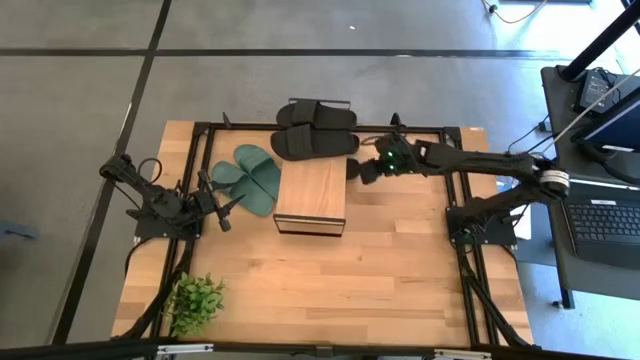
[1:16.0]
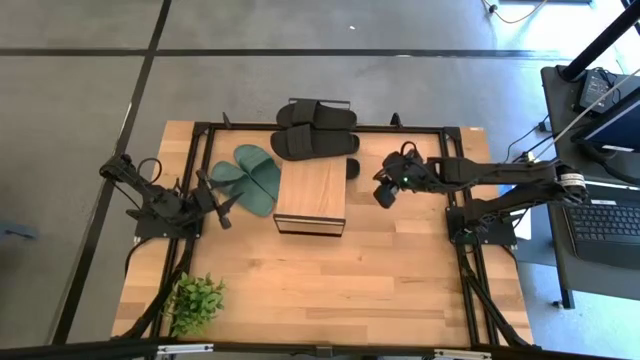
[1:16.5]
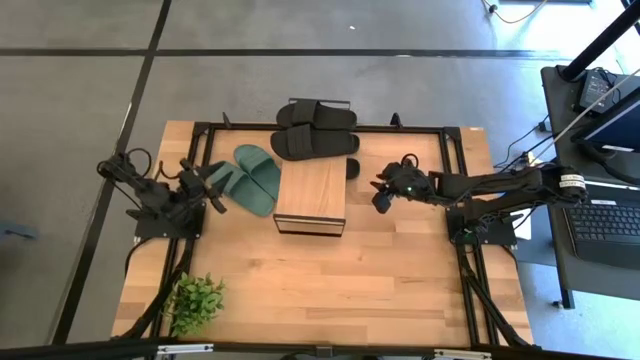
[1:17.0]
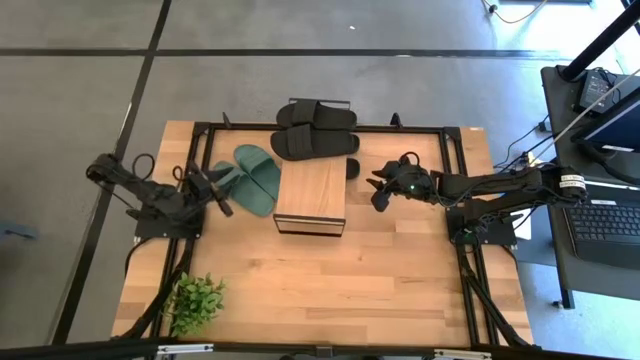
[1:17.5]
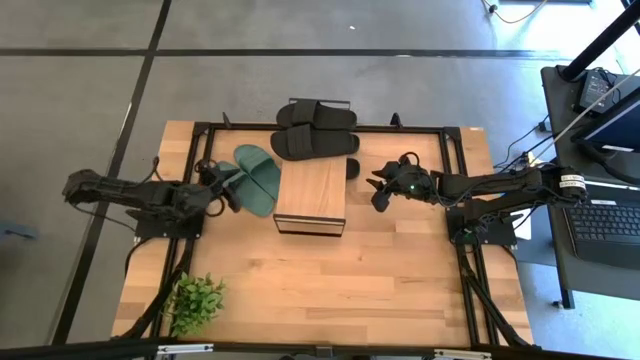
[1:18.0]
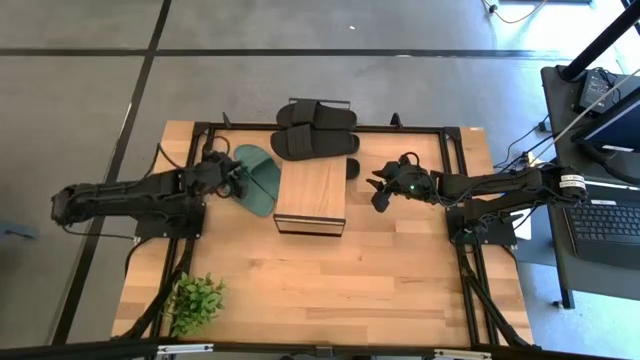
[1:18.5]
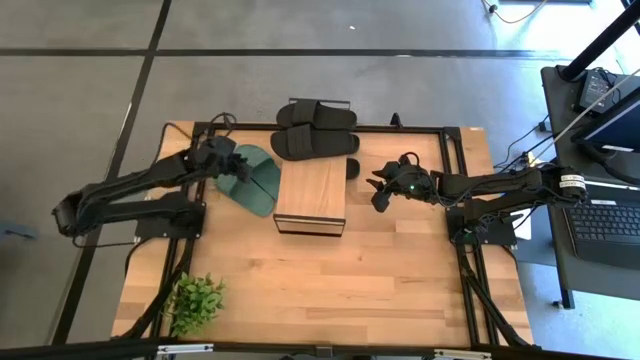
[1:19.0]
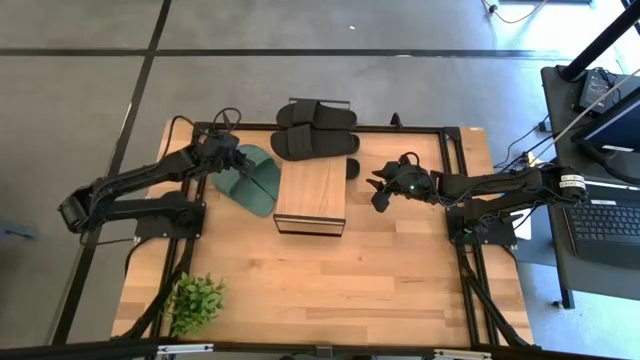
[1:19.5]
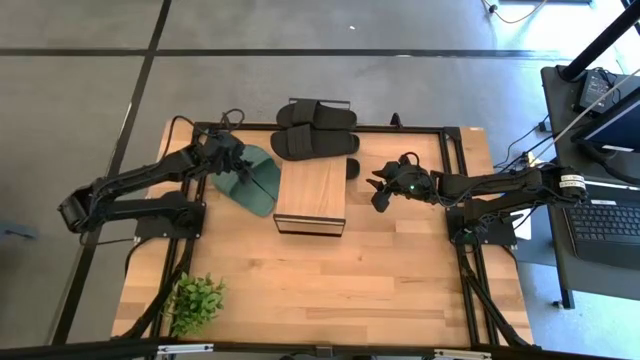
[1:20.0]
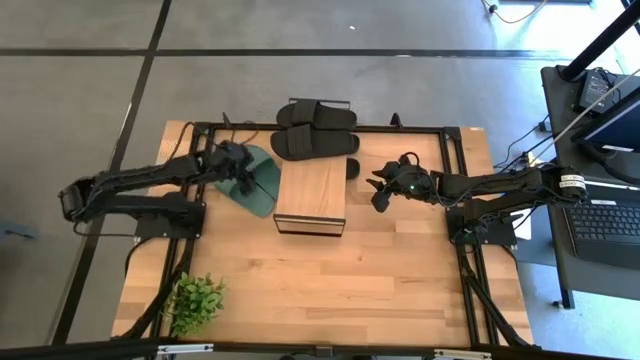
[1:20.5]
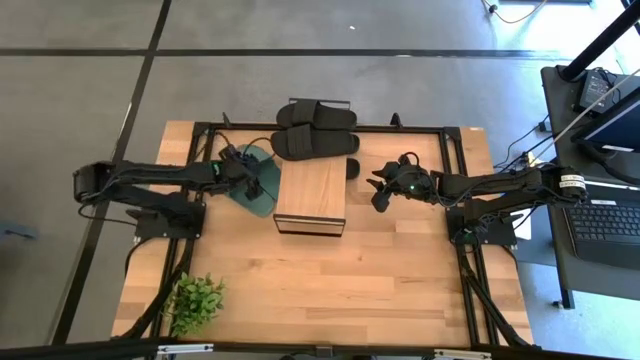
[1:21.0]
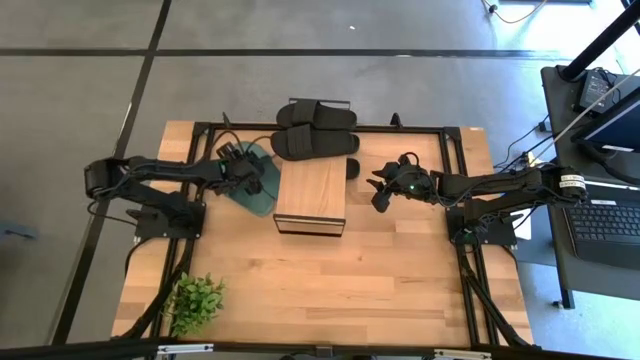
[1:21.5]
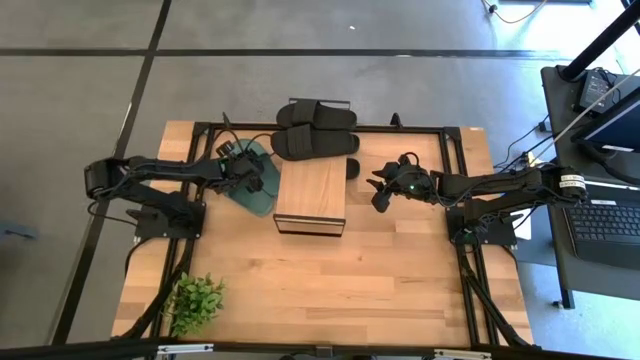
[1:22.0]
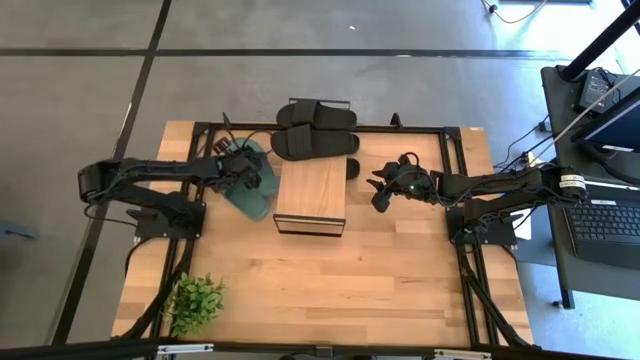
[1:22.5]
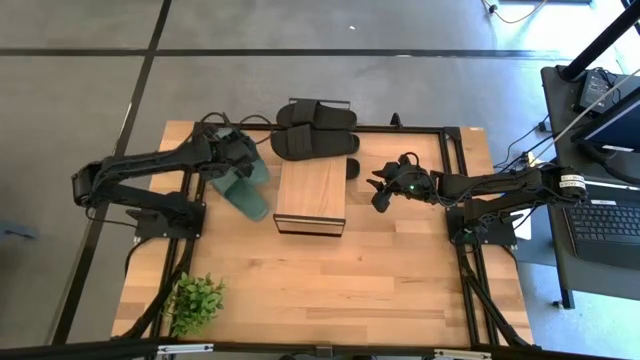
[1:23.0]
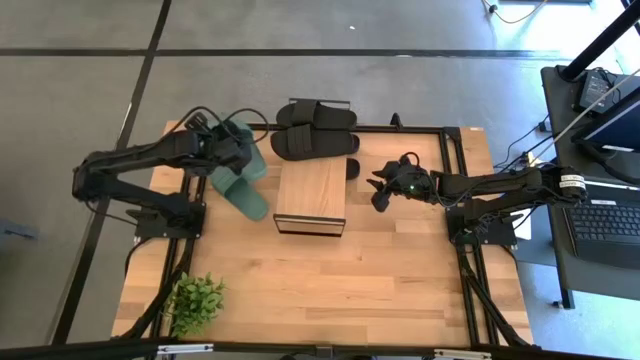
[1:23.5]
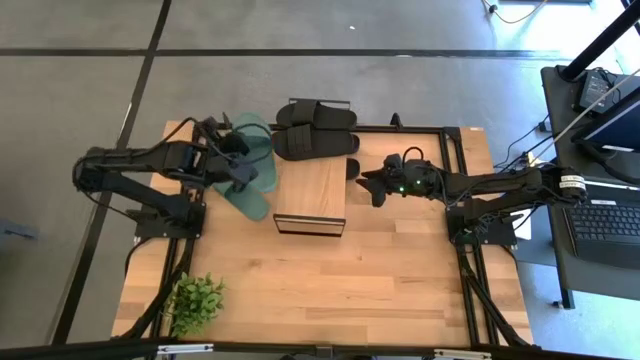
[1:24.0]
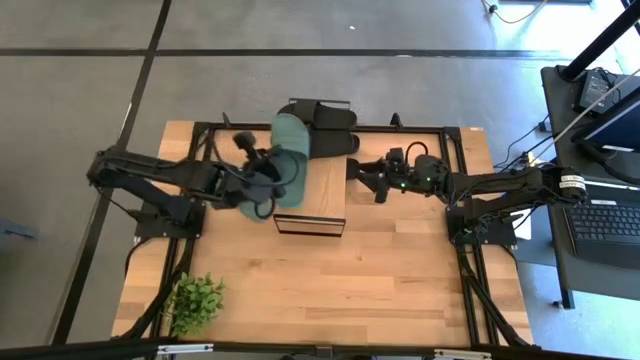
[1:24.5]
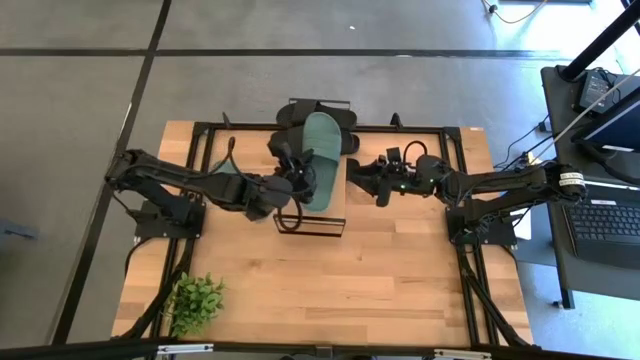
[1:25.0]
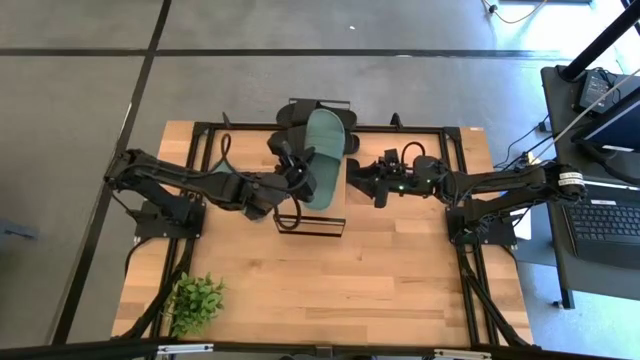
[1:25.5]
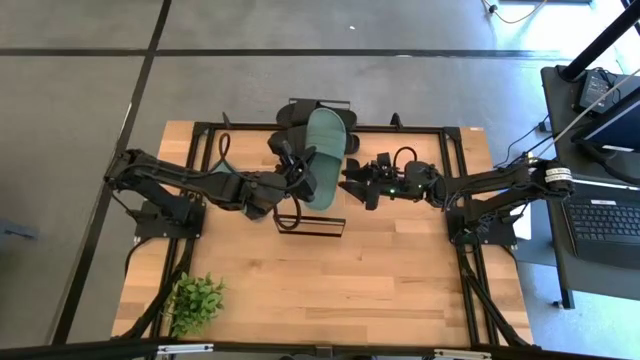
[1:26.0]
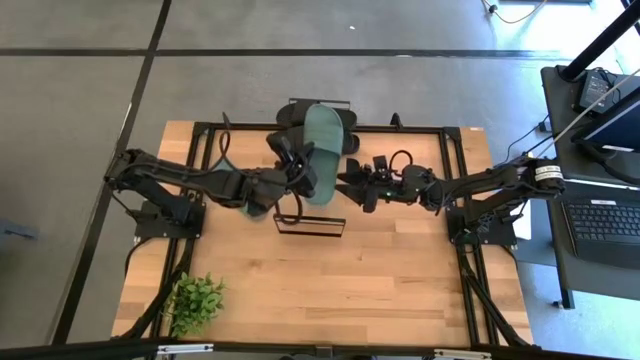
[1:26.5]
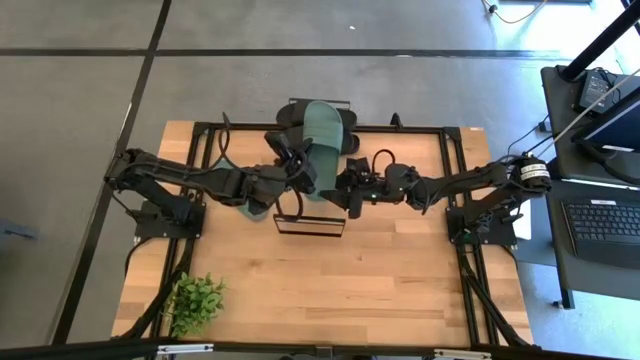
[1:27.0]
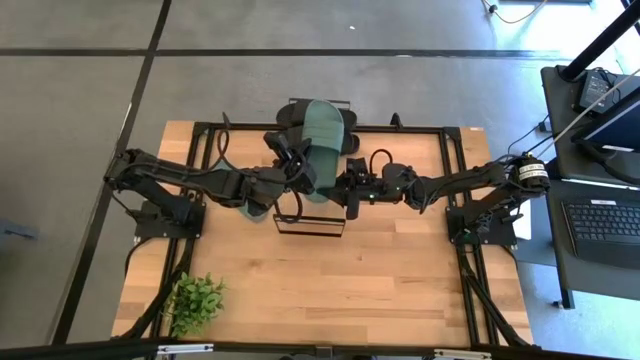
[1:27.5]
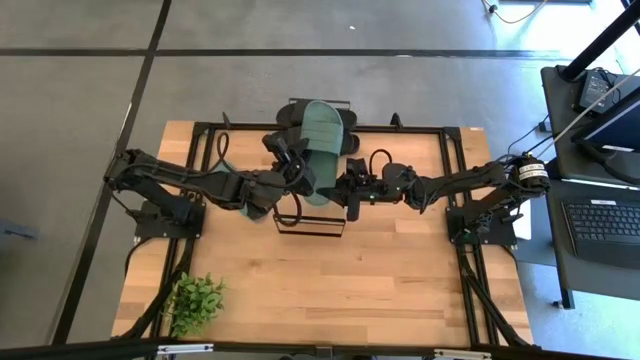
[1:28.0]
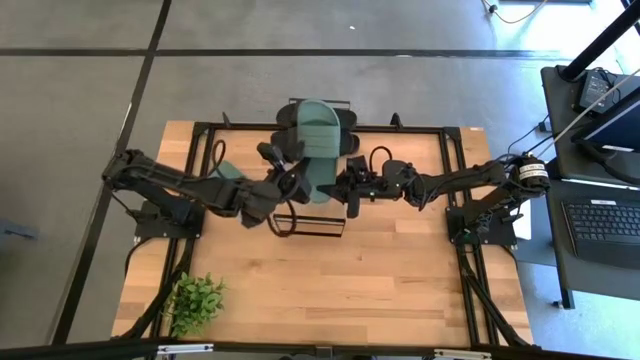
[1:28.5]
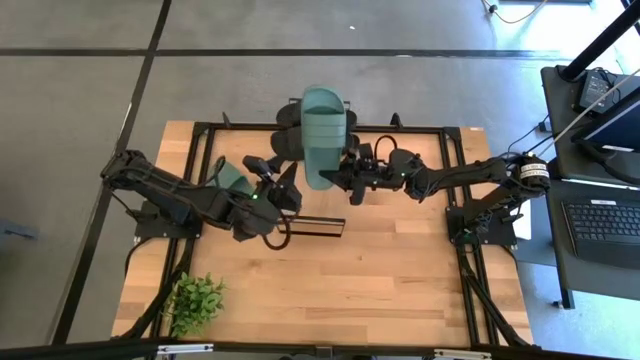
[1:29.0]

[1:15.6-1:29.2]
Task: Pick and place slides into the shelf
Put the green slipper under the shelf

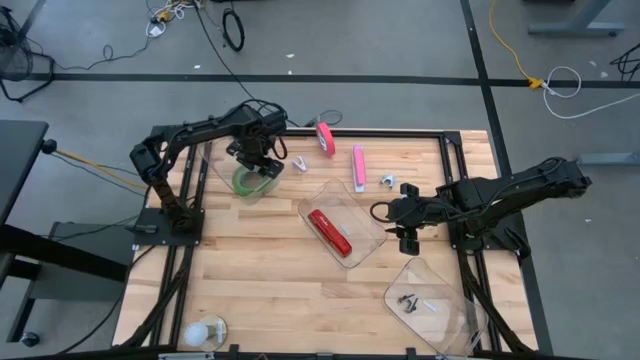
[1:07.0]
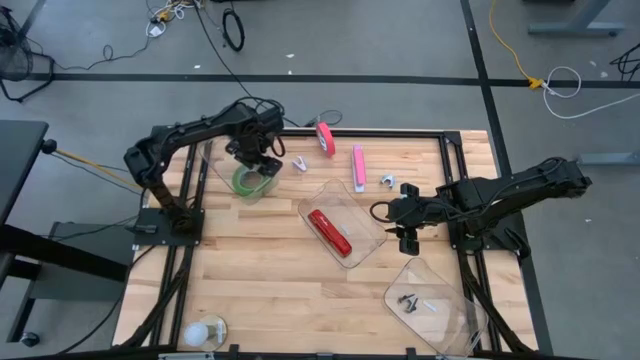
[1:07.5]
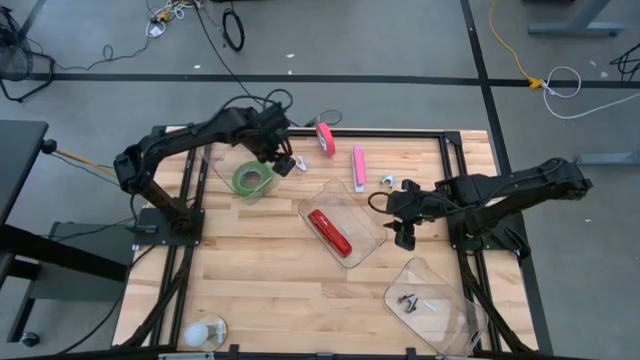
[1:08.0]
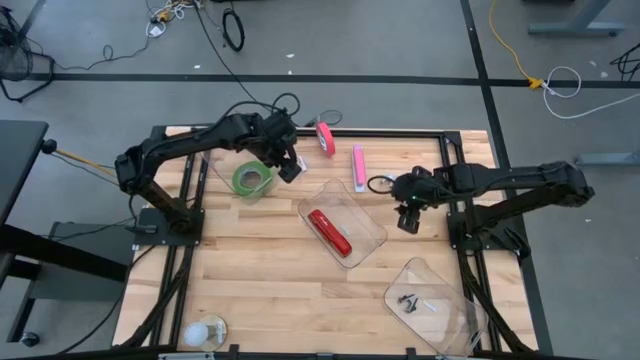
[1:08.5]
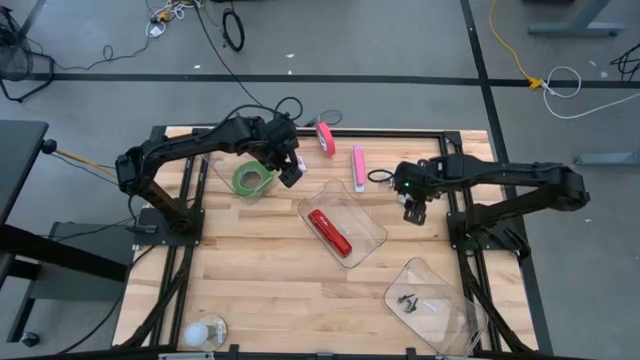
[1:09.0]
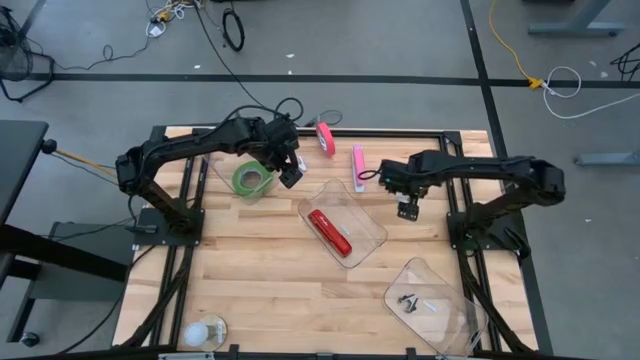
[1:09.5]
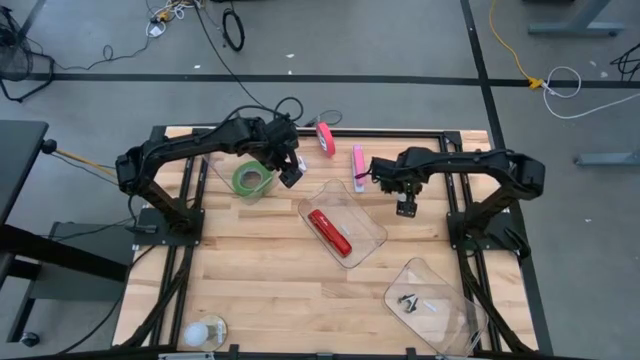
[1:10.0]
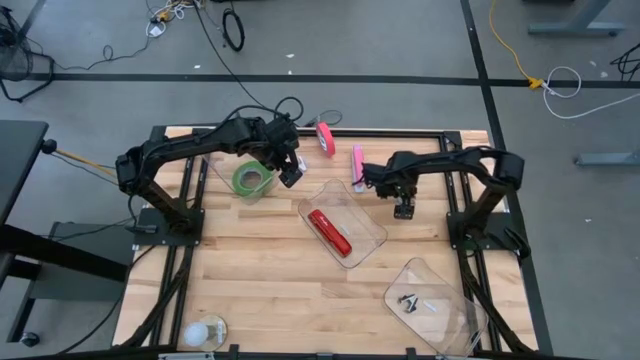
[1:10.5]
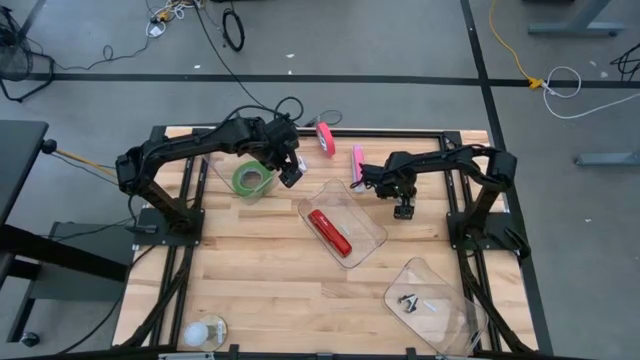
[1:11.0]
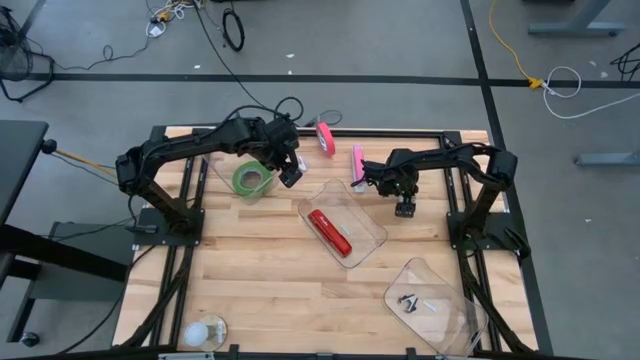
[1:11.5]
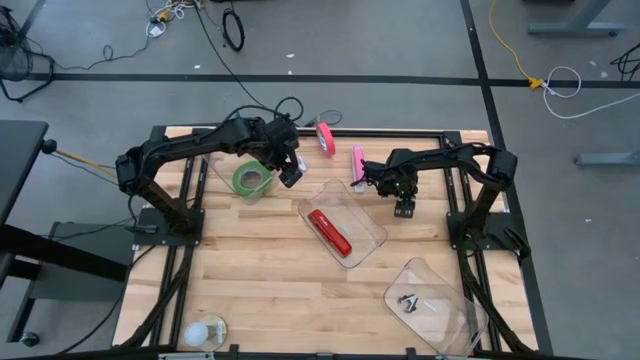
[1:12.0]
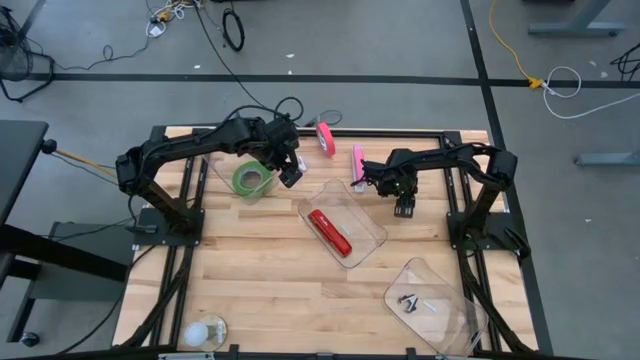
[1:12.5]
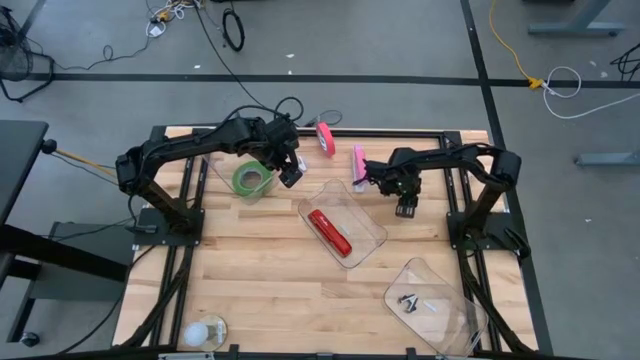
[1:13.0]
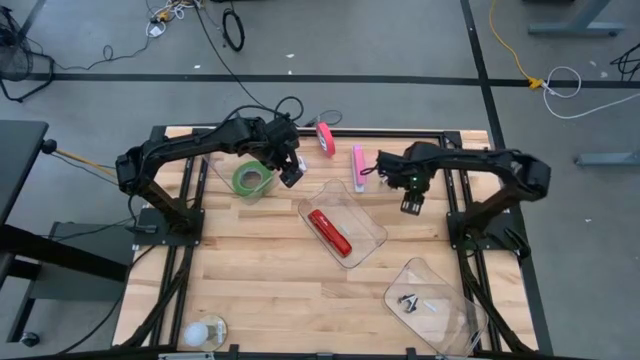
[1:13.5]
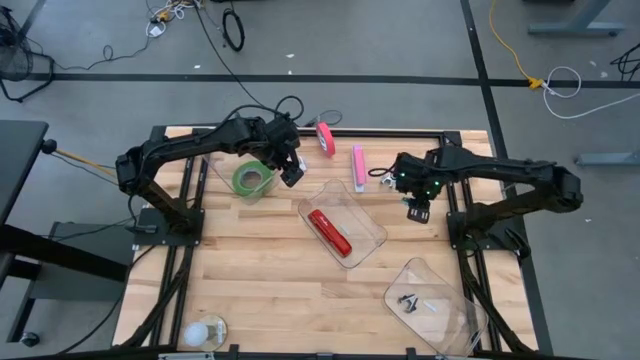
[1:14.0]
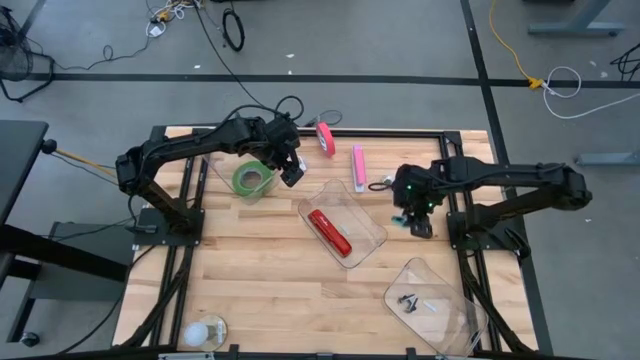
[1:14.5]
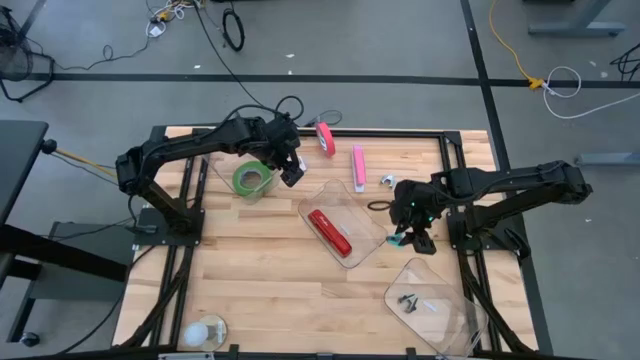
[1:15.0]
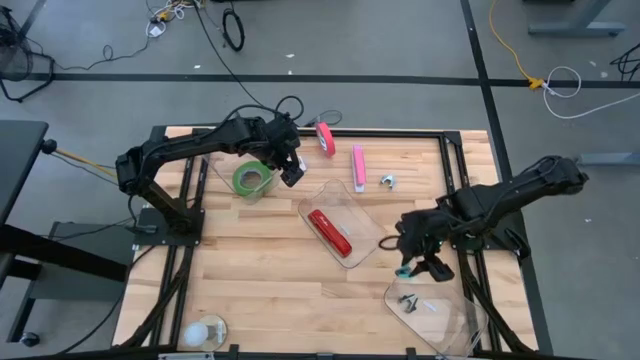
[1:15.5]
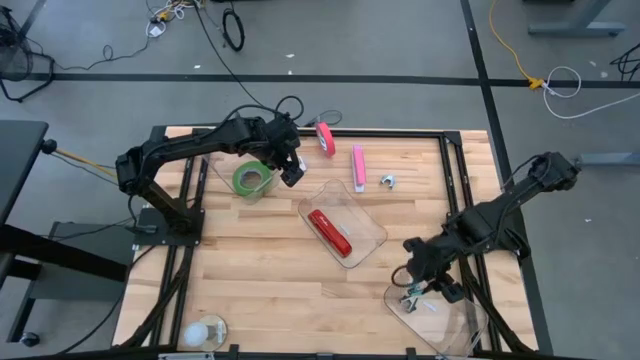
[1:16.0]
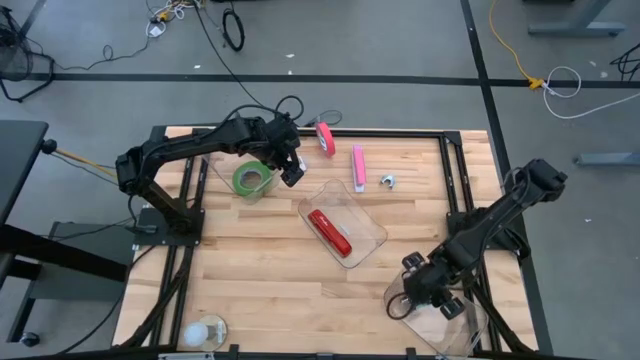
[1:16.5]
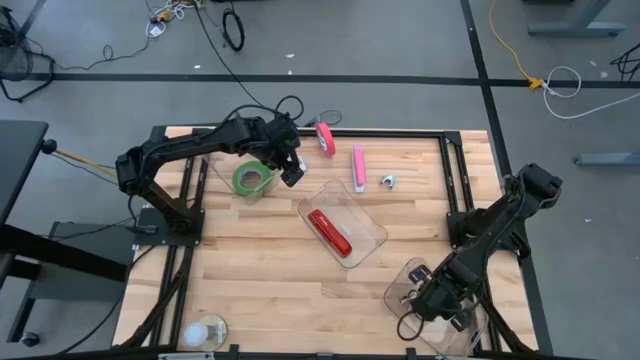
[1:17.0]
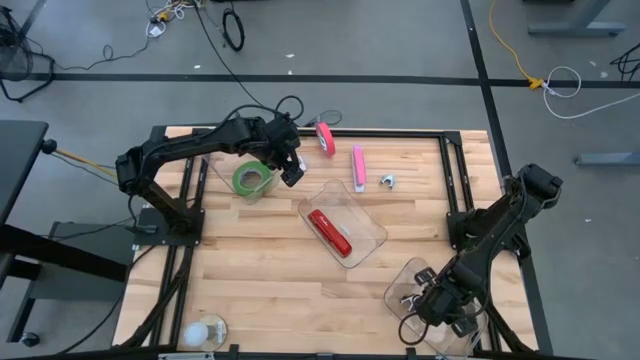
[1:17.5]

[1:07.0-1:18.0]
Task: Pick and place Stapler, Stapler remover, tape
Put the light blue staple remover into the bottom transparent bin
